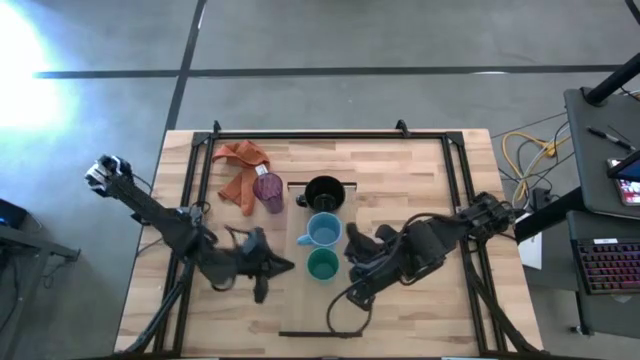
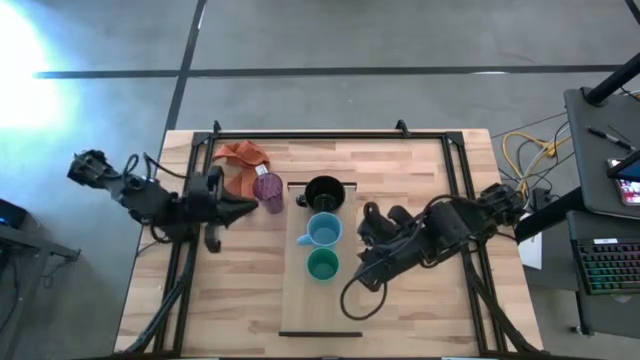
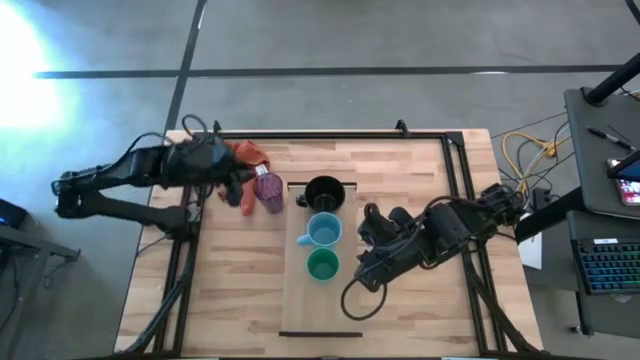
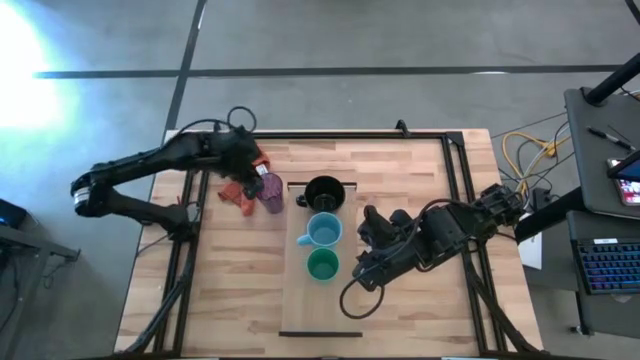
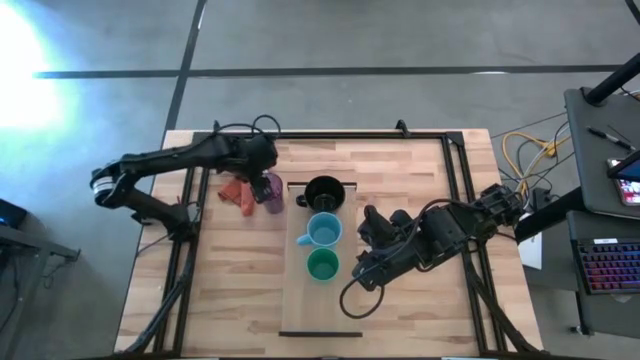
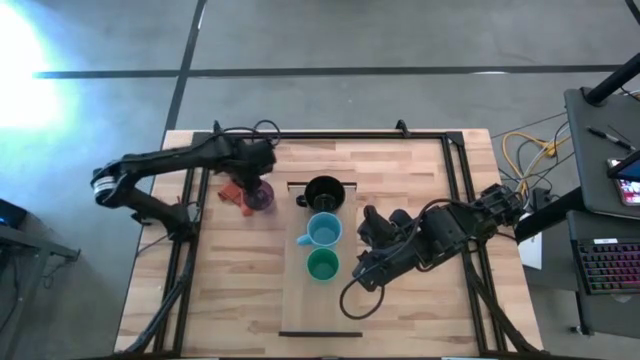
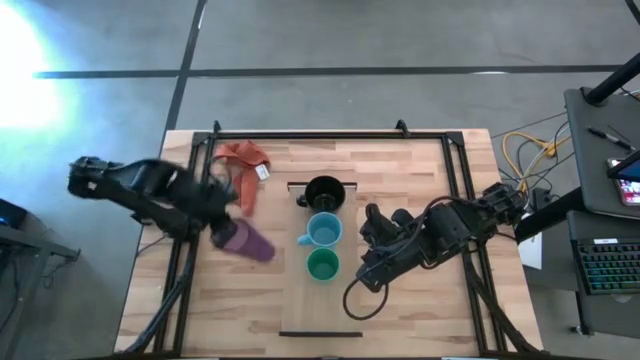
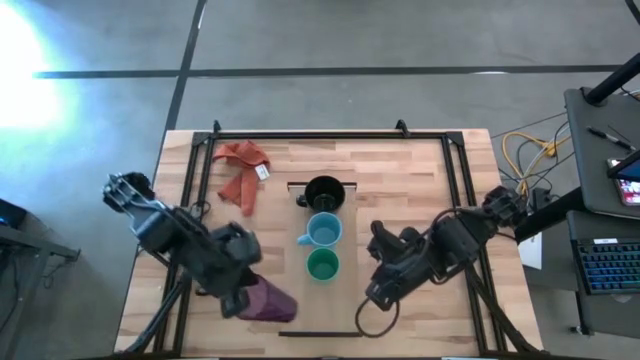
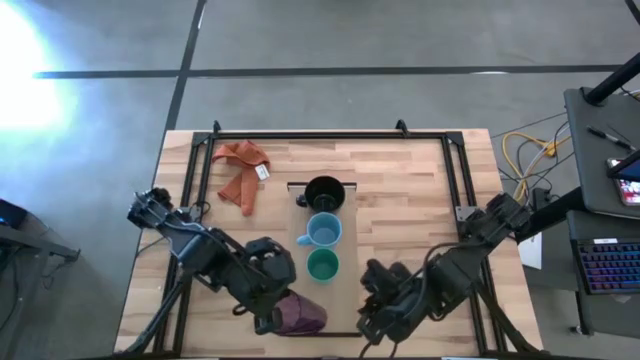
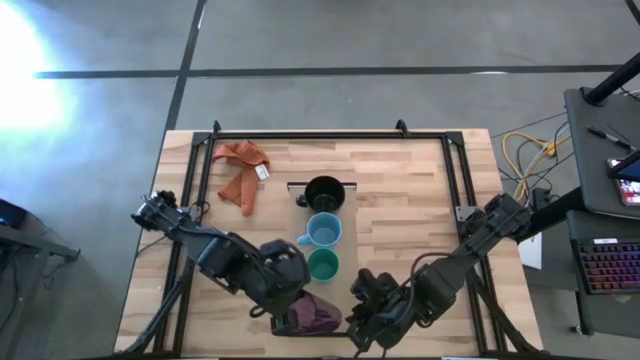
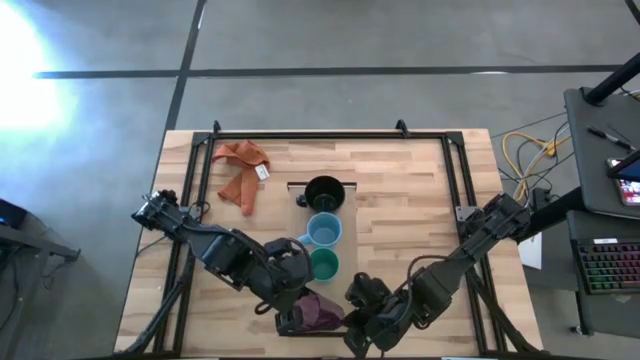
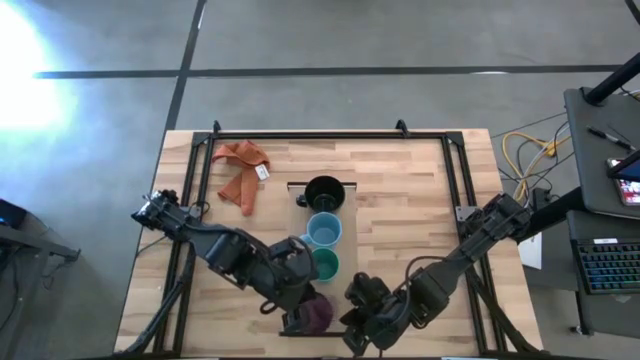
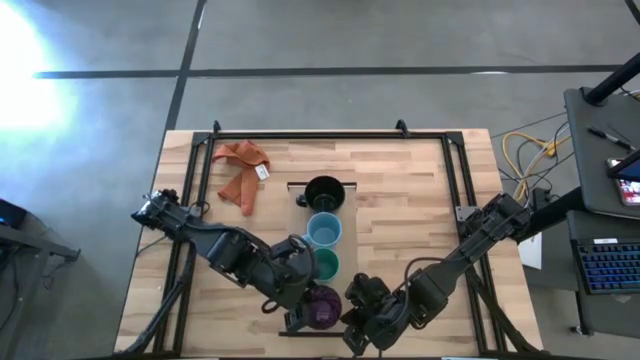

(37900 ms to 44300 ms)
Task: Stack small to large cups/mugs on shelf
Put the purple cup on the shelf

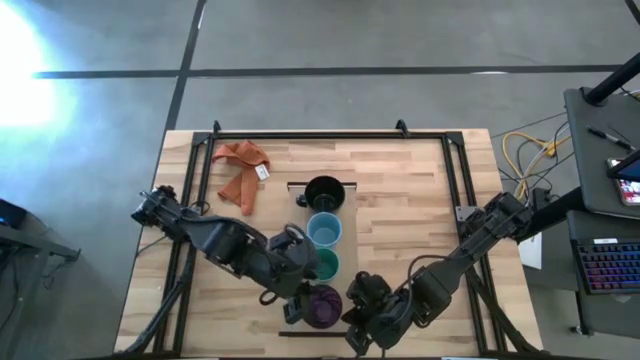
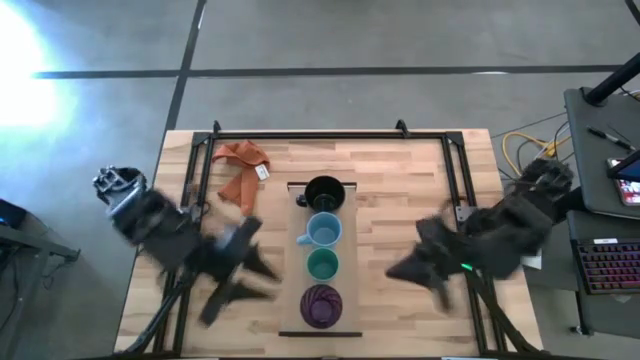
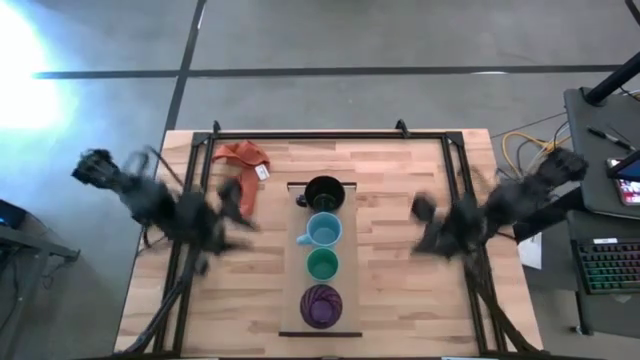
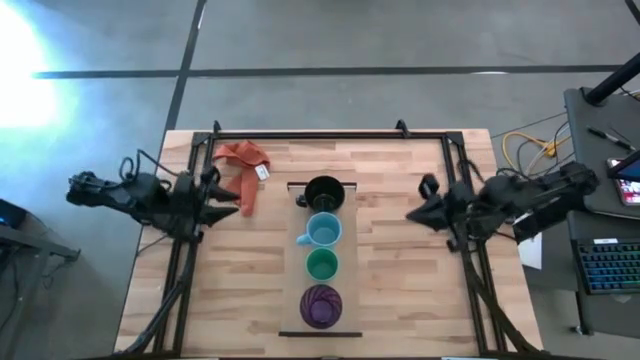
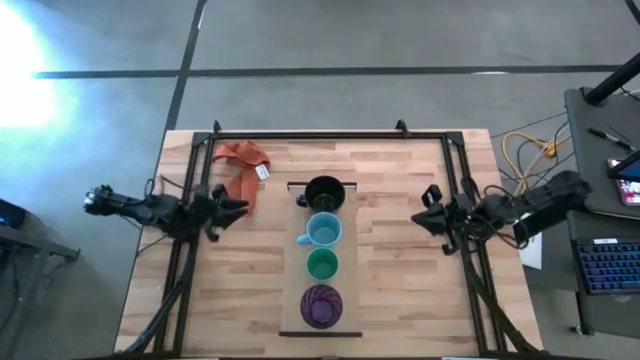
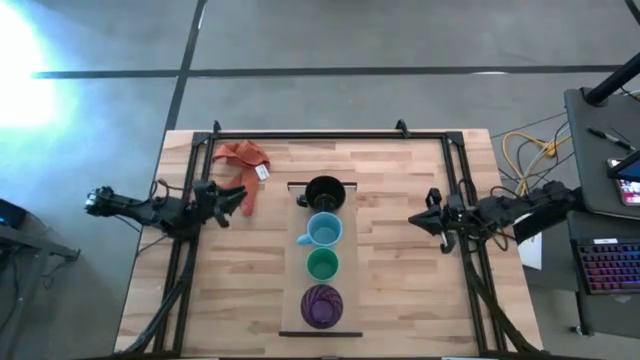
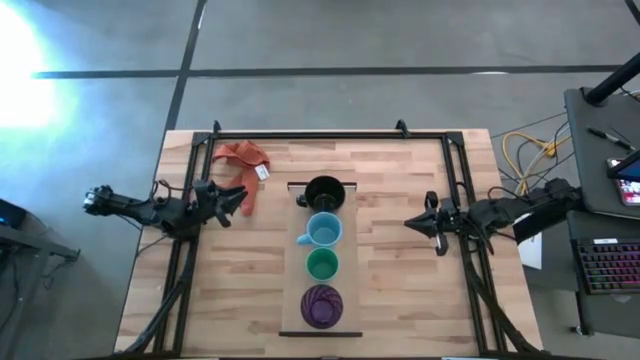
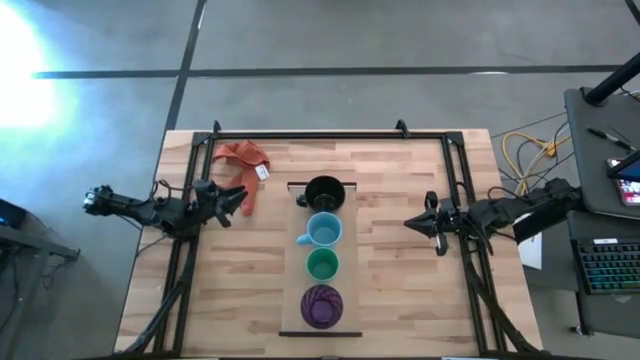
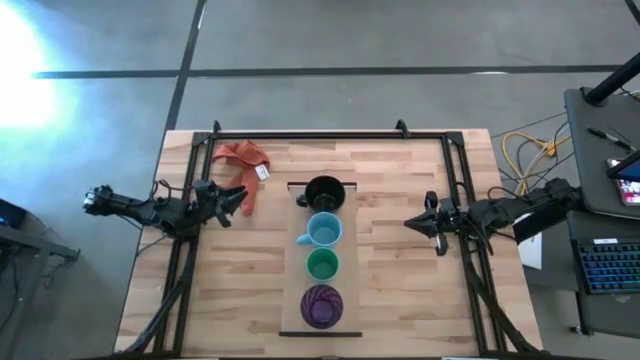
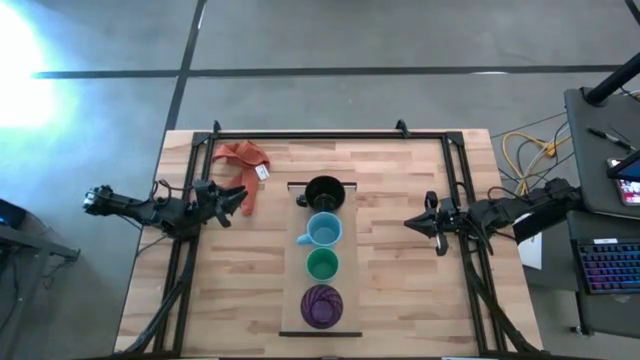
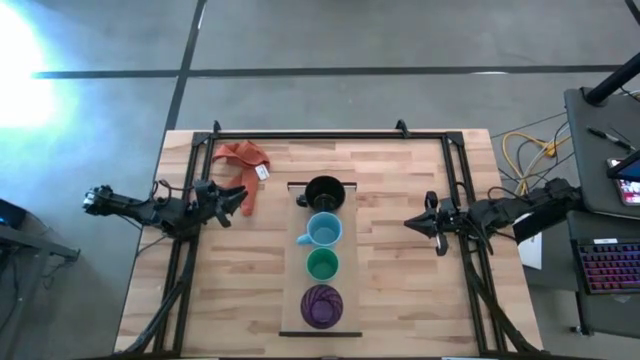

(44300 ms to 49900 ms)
Return to Home Position

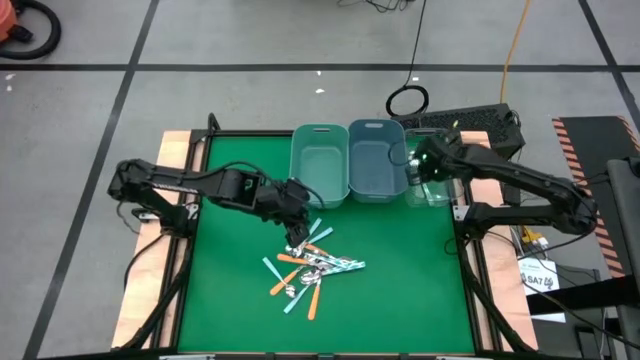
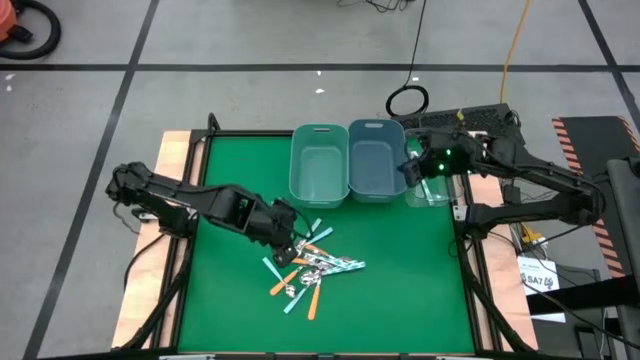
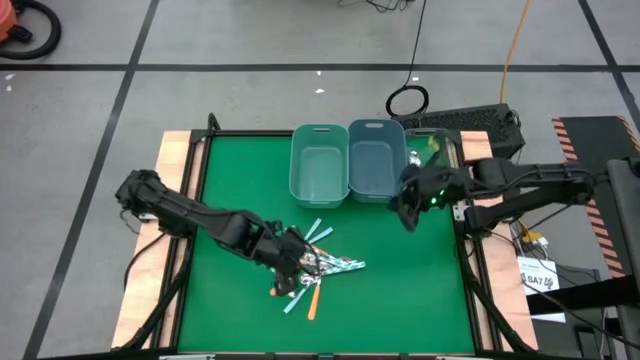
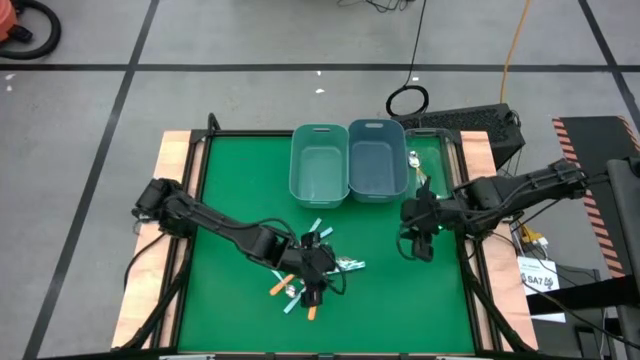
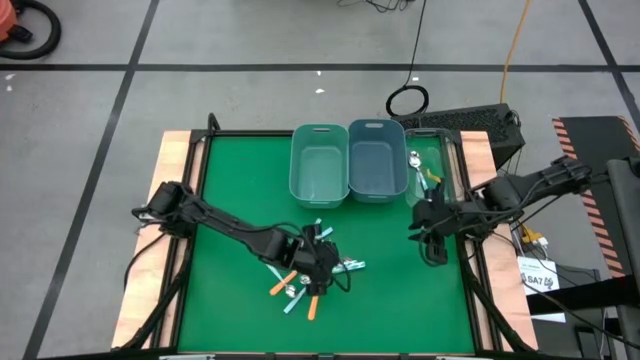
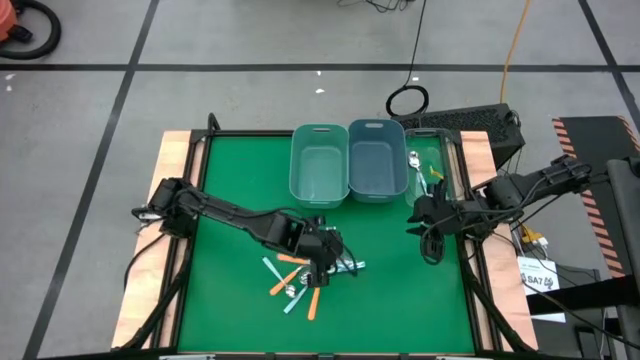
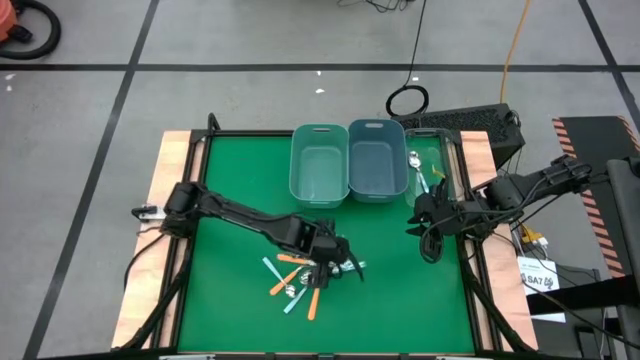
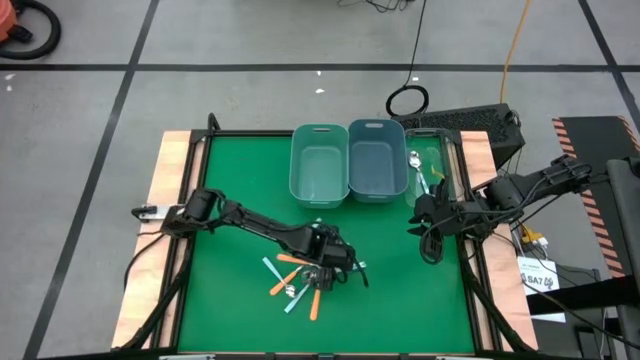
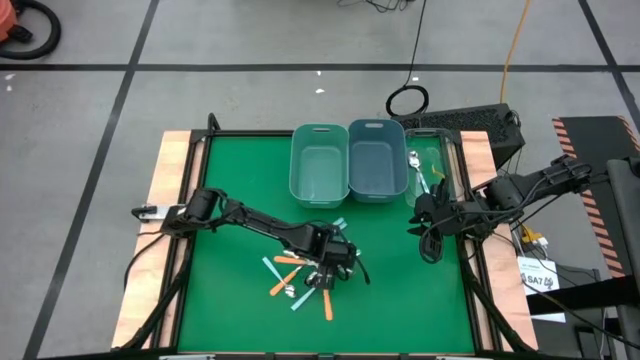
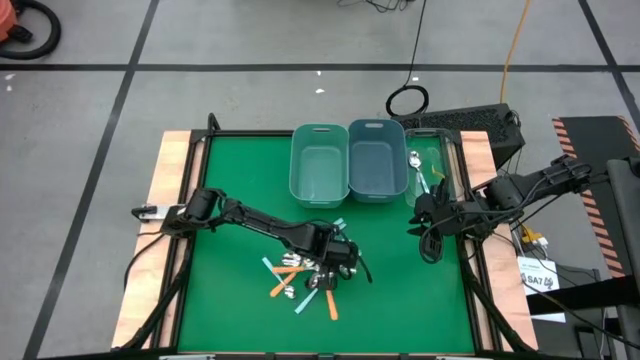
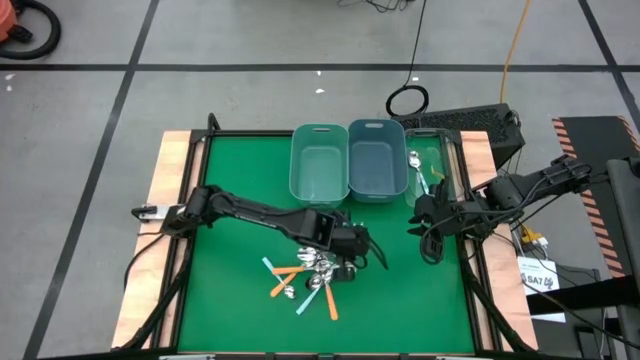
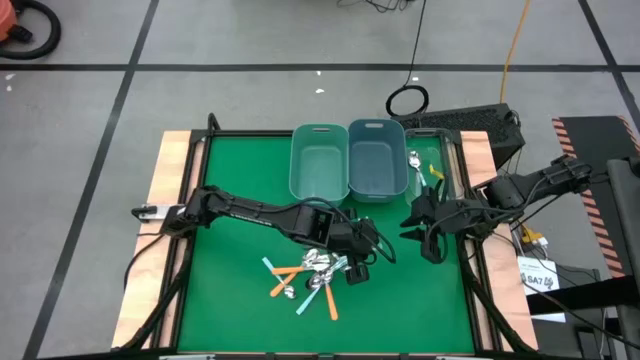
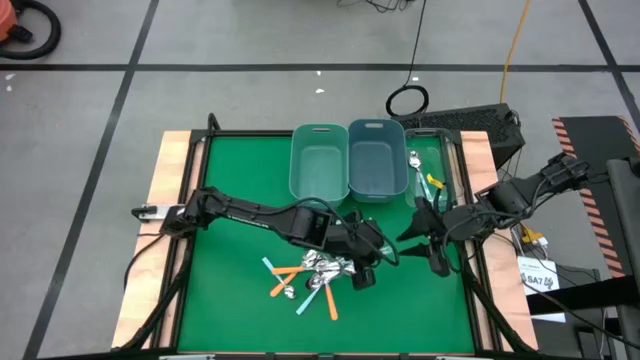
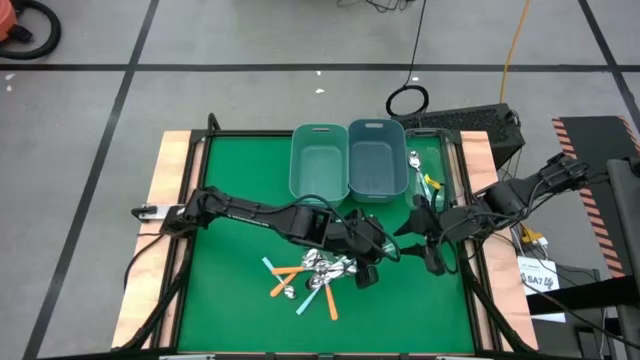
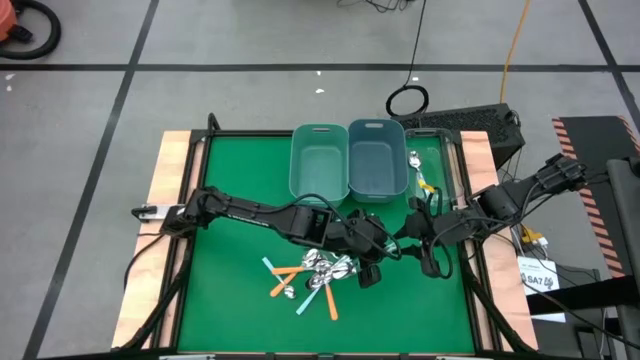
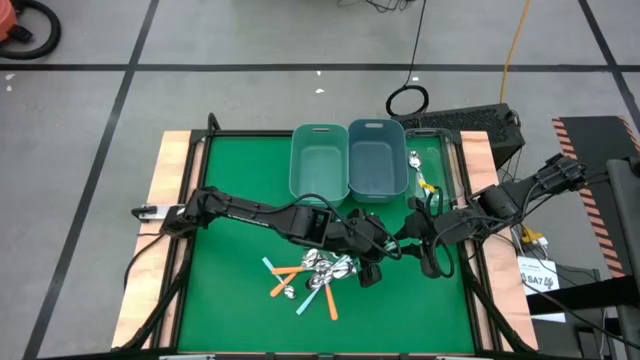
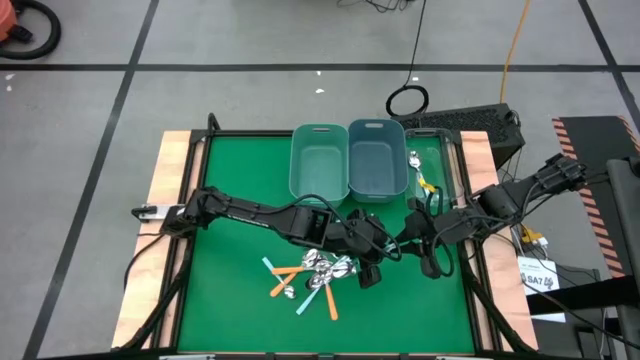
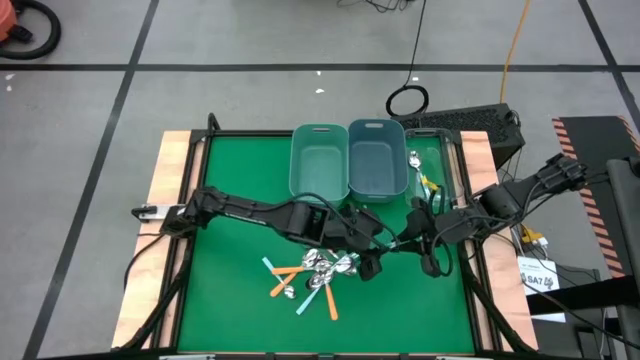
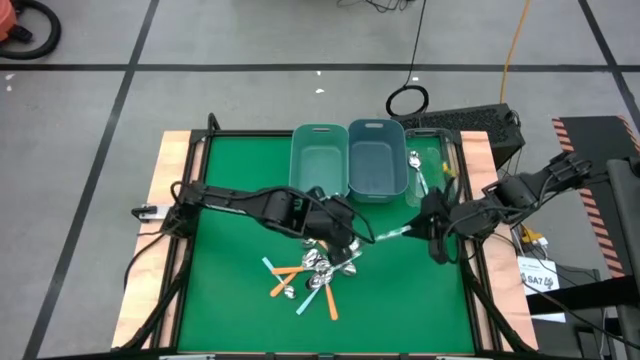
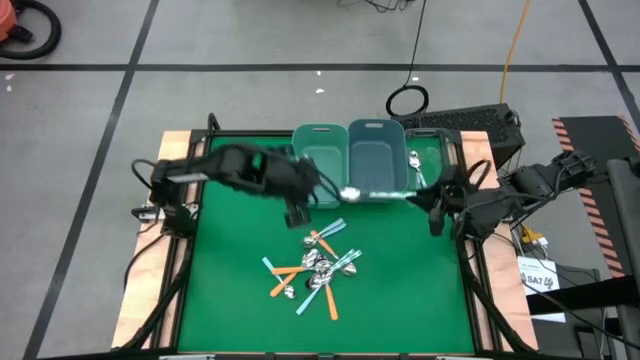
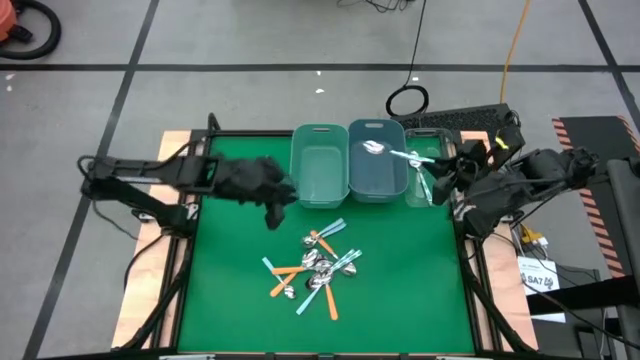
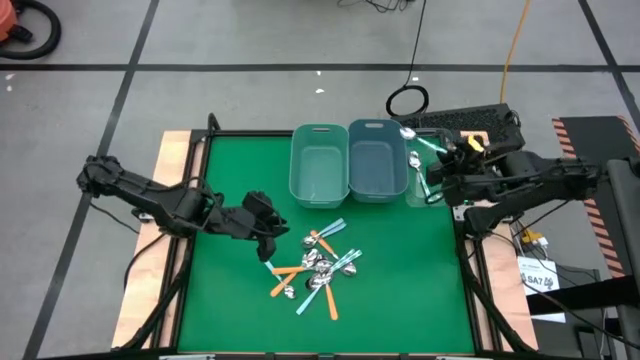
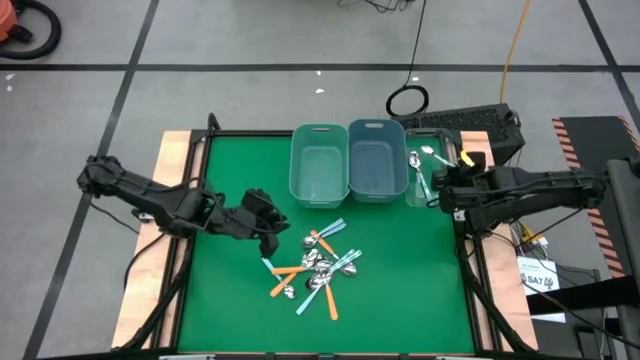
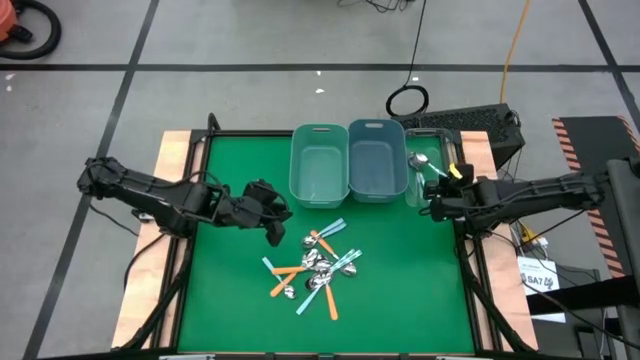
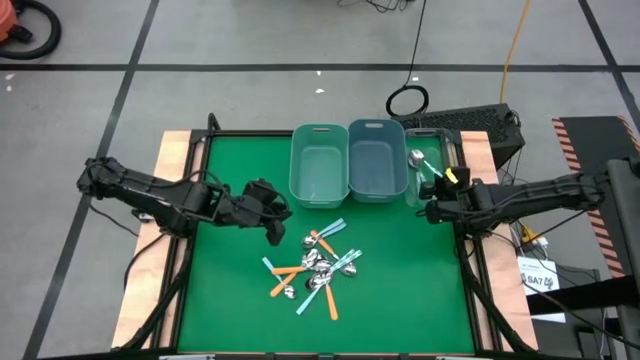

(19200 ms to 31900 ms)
Task: Sort silverware by color (type)
Put the green spoon into the transparent bin
